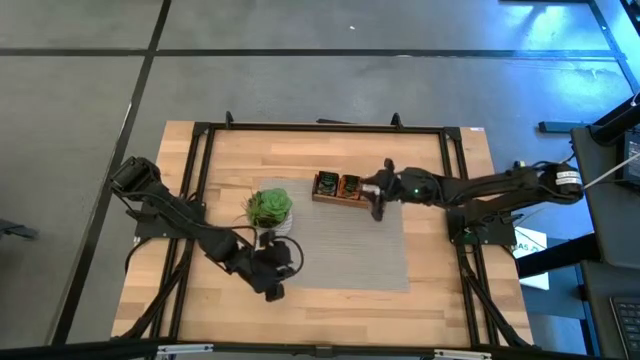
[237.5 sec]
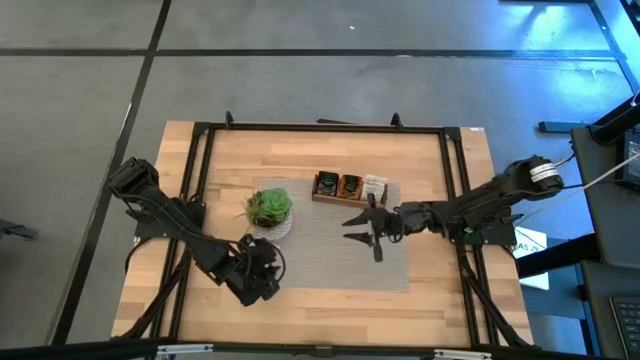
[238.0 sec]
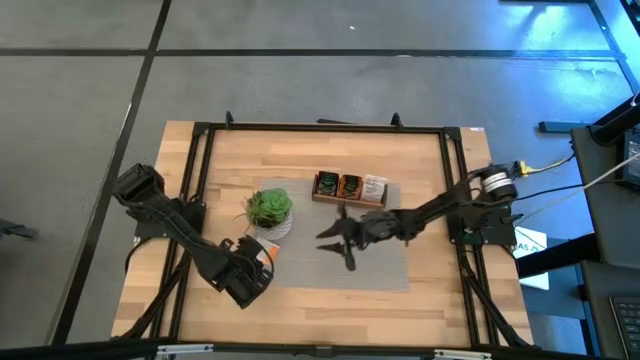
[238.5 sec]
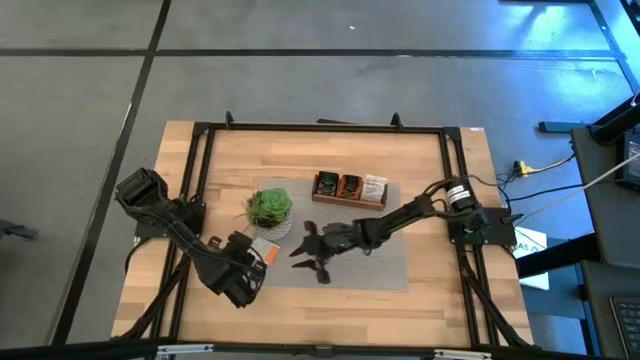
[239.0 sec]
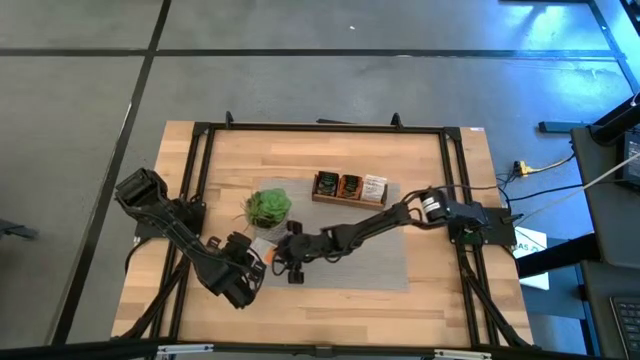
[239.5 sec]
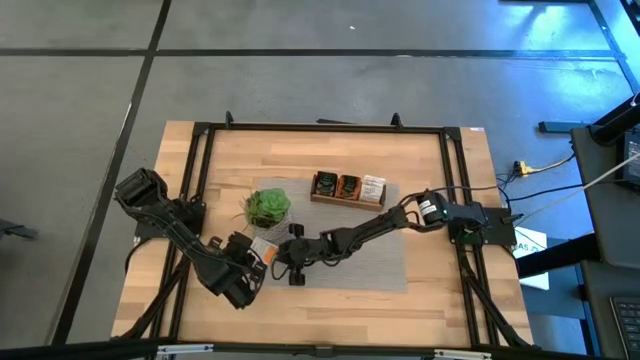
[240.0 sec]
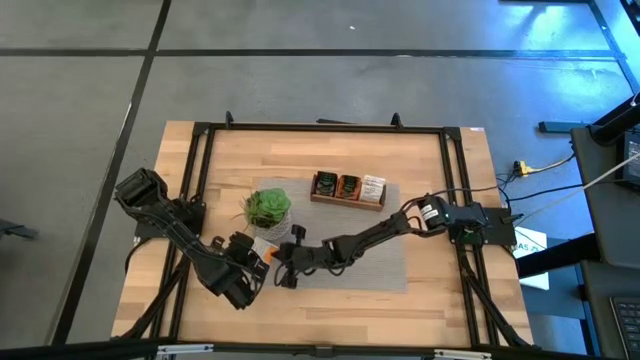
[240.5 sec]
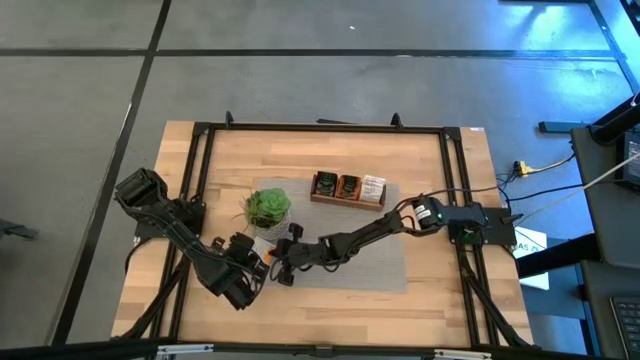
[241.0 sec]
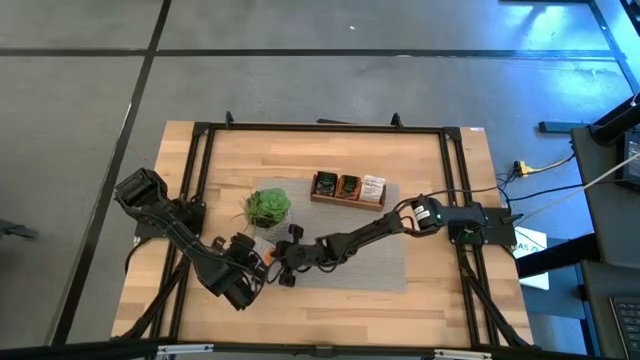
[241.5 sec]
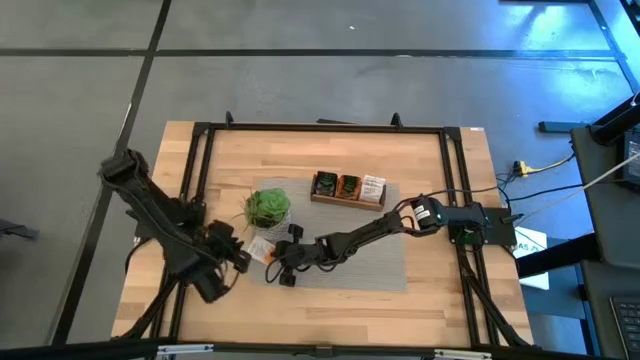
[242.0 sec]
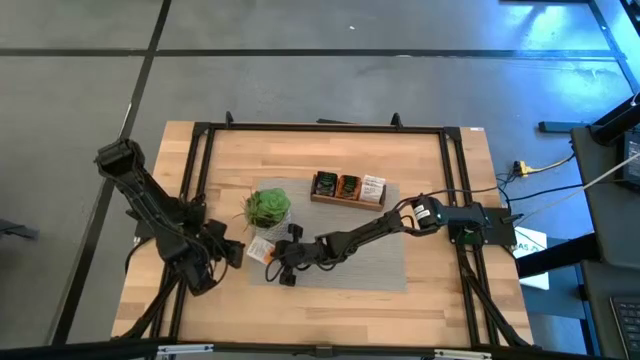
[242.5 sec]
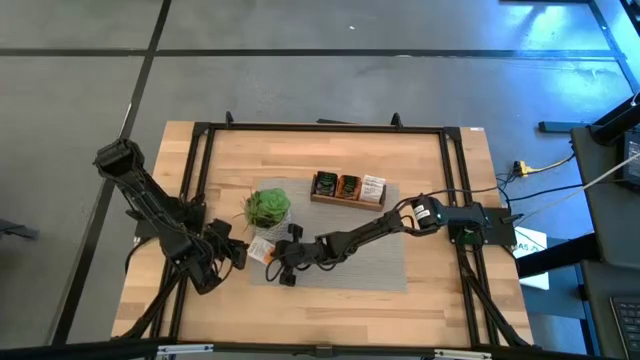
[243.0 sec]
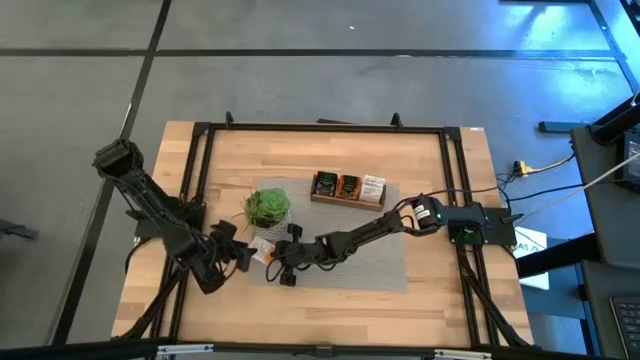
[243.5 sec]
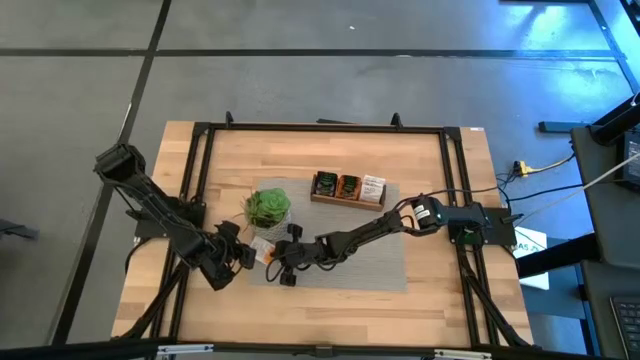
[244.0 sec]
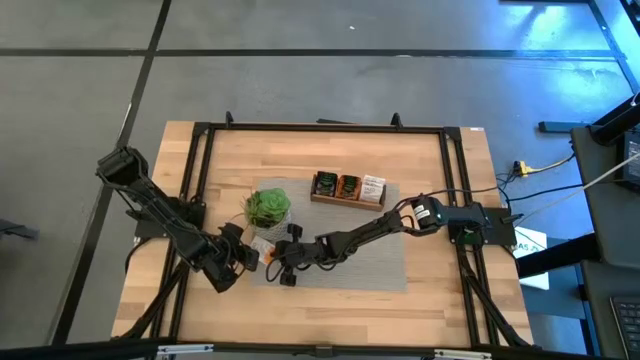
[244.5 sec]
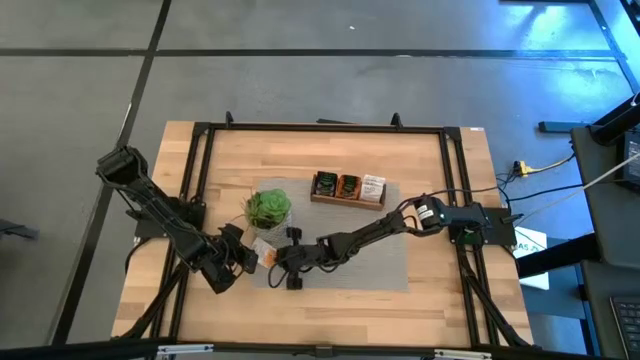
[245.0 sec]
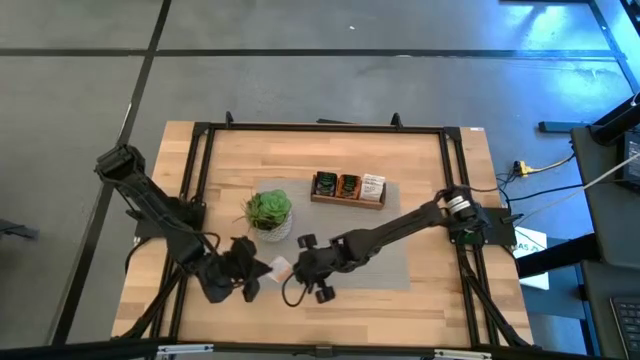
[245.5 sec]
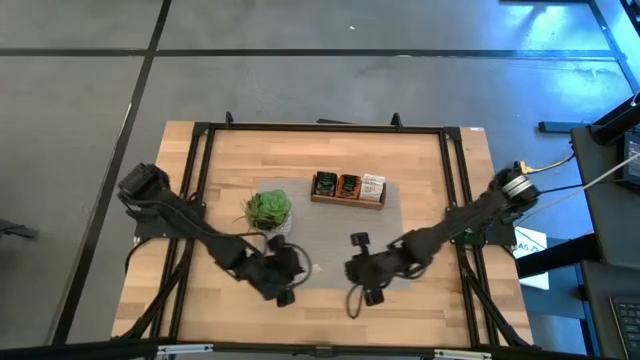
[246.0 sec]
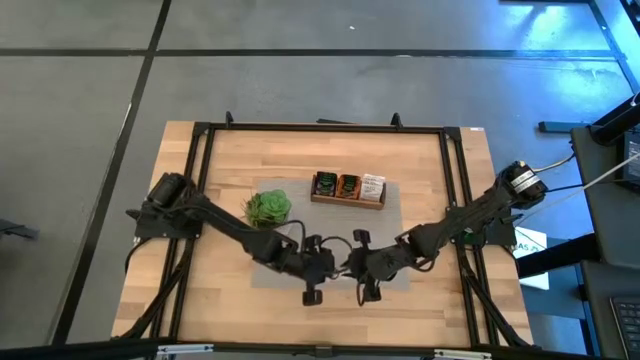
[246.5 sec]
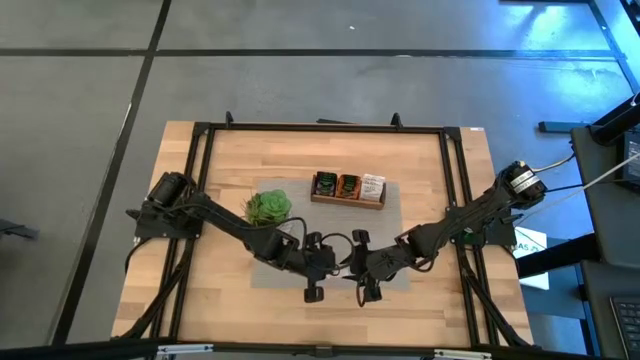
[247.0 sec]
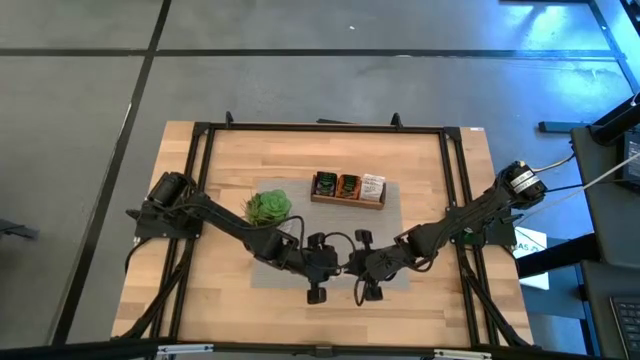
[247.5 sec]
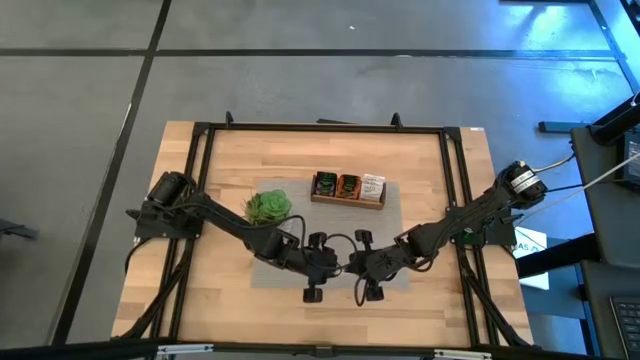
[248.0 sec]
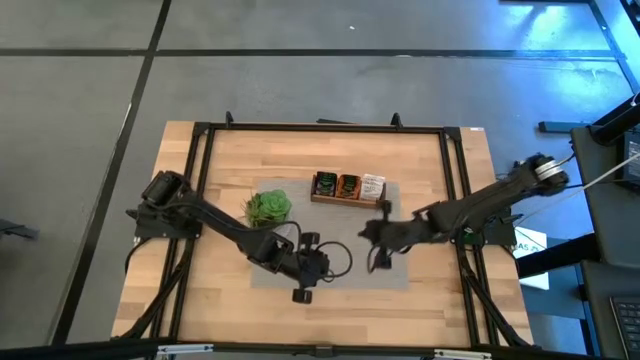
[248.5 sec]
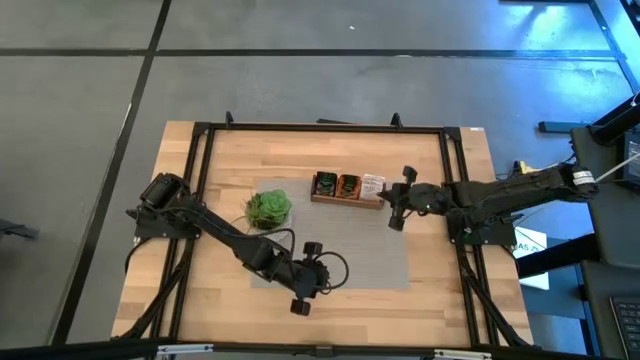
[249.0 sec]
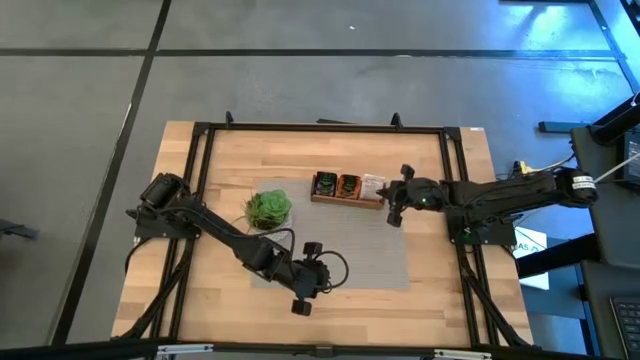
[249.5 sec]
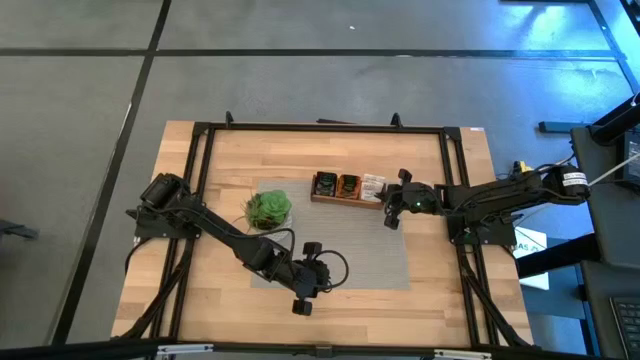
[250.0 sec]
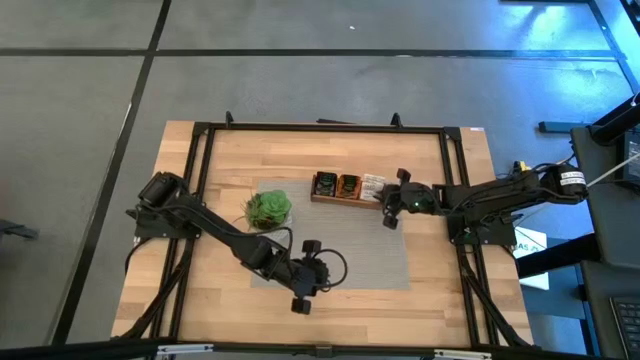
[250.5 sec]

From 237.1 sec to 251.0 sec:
Task: Pick & Place Tea
Put the white tea bag into the right section of the wooden organizer

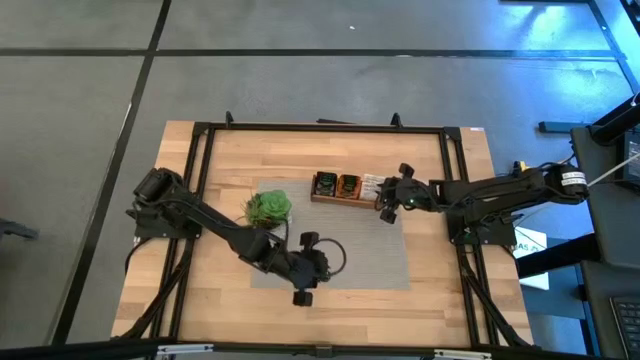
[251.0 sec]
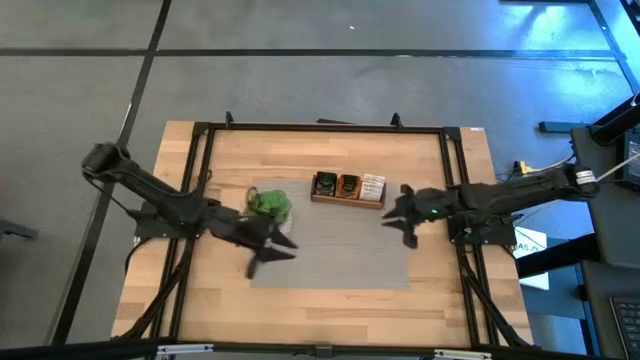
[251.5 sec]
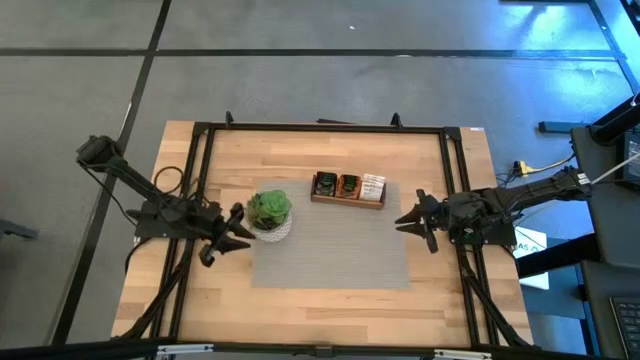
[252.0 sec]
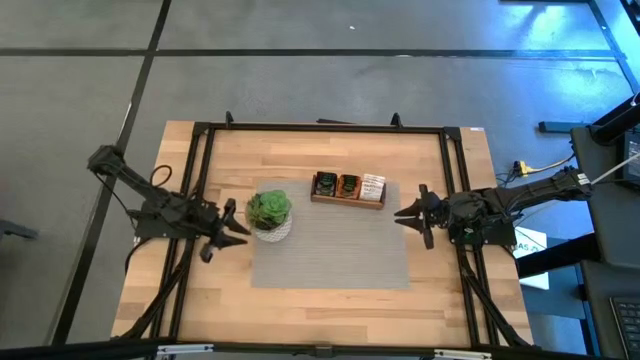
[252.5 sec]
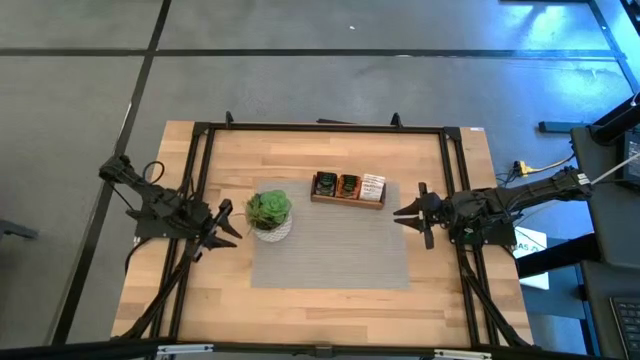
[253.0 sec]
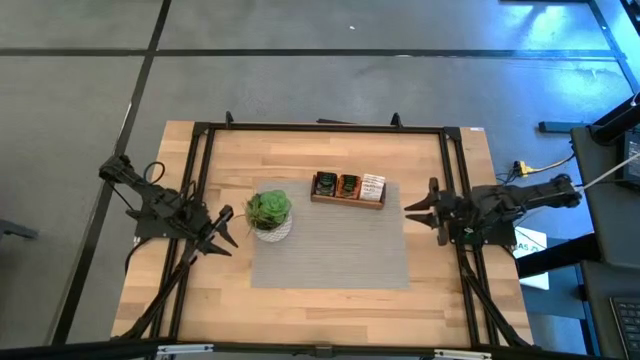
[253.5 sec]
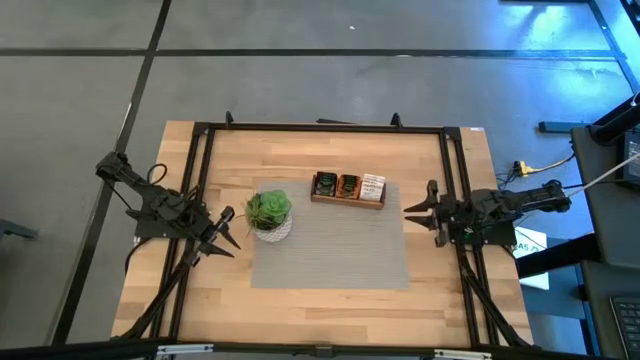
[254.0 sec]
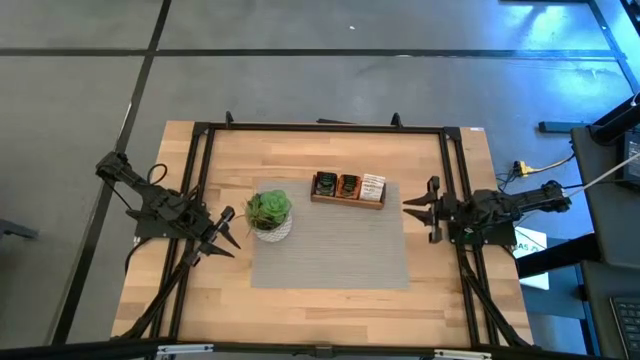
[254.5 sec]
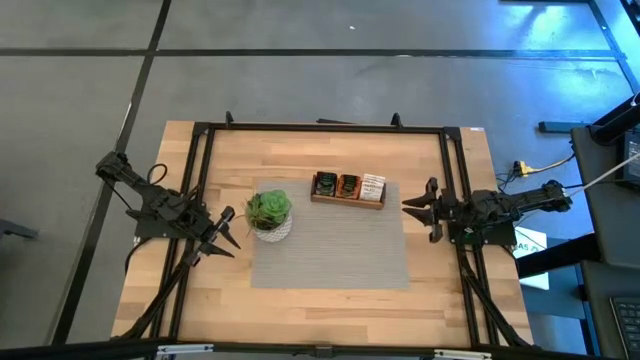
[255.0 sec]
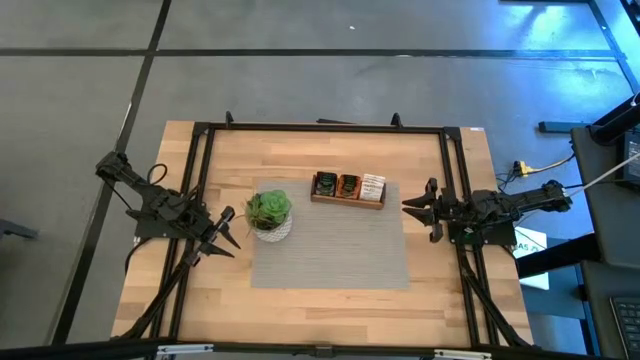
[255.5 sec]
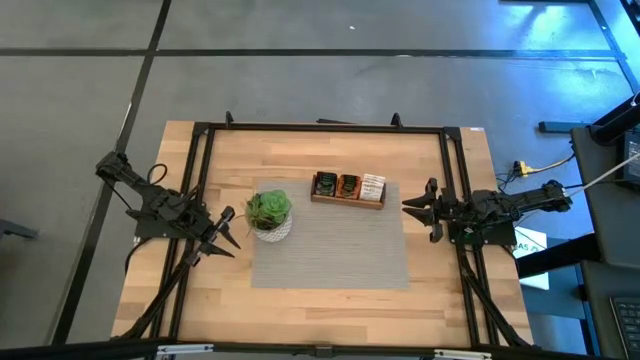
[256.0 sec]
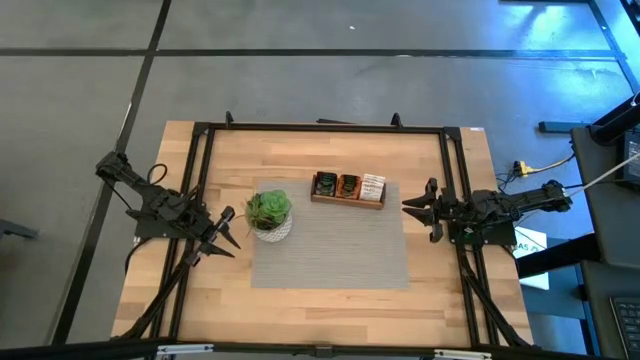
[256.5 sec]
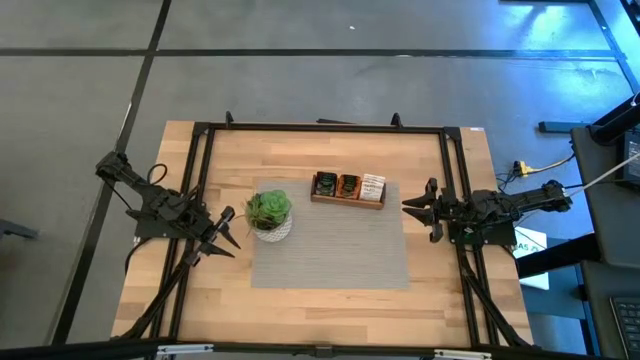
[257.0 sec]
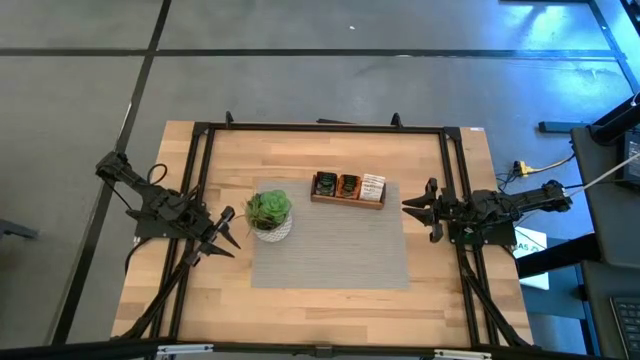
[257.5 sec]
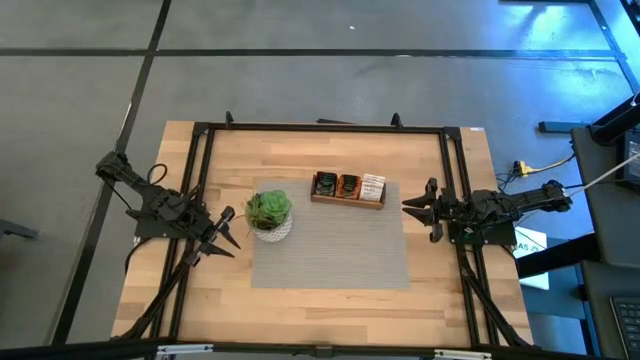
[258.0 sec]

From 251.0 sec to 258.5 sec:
Return to Home Position
